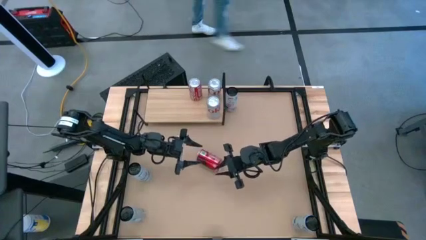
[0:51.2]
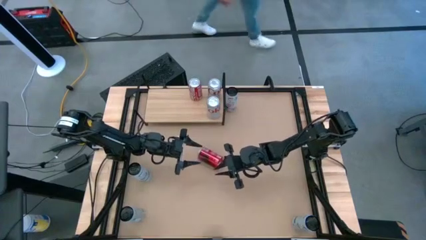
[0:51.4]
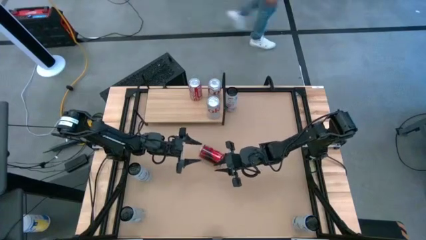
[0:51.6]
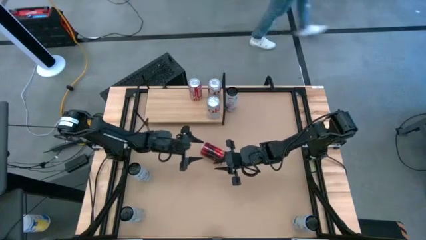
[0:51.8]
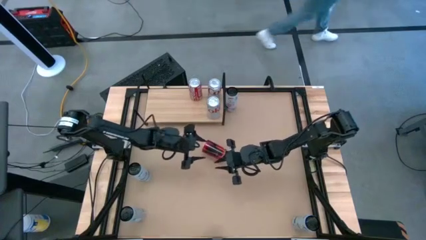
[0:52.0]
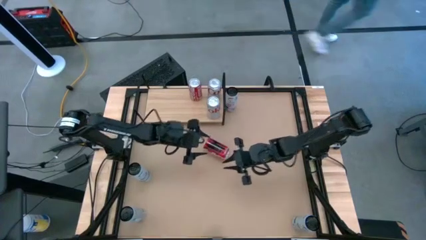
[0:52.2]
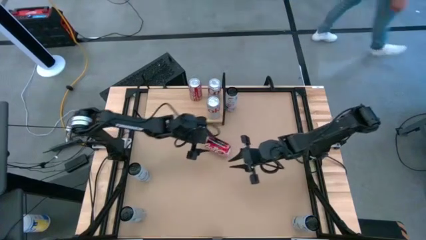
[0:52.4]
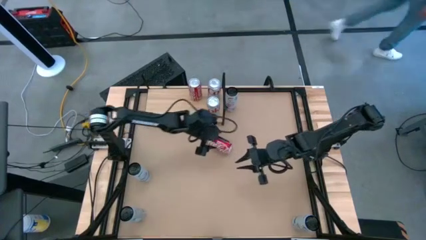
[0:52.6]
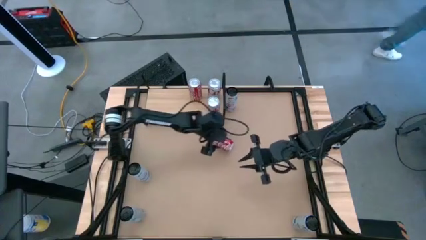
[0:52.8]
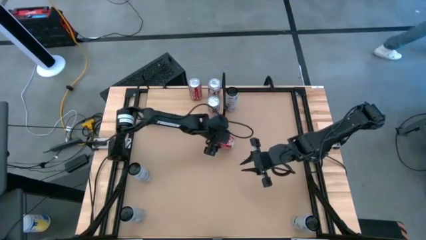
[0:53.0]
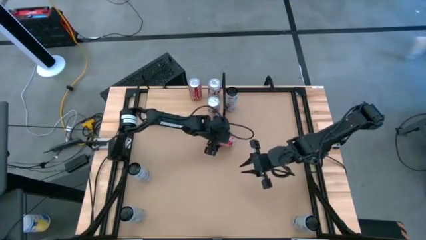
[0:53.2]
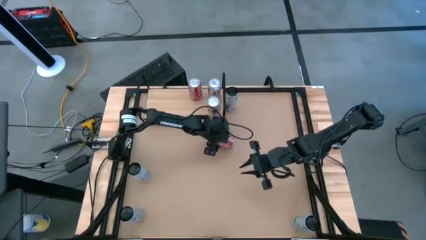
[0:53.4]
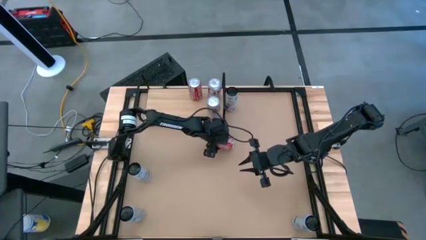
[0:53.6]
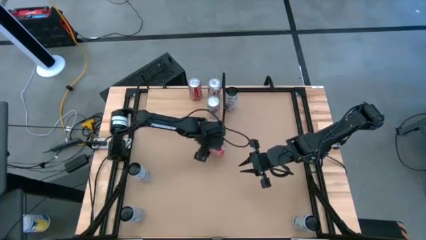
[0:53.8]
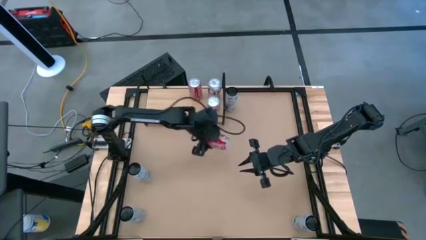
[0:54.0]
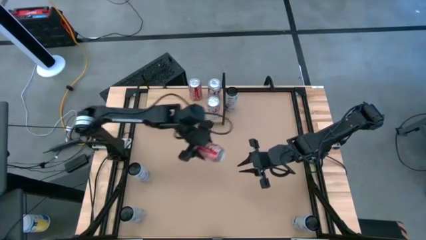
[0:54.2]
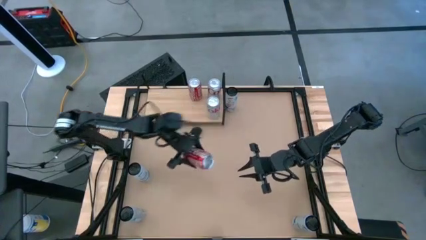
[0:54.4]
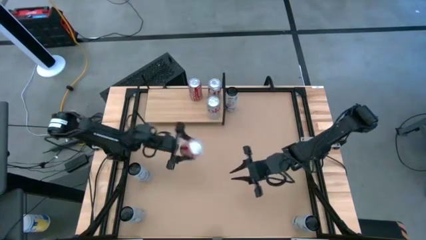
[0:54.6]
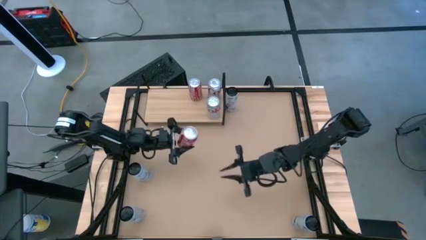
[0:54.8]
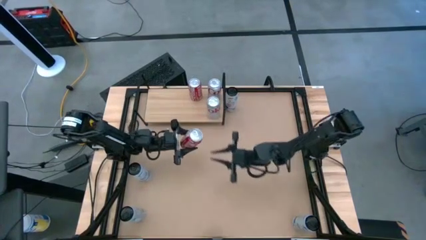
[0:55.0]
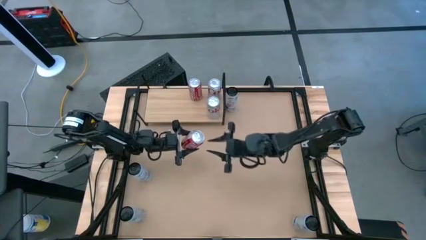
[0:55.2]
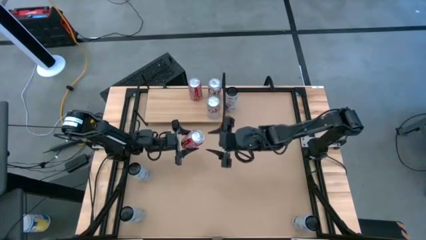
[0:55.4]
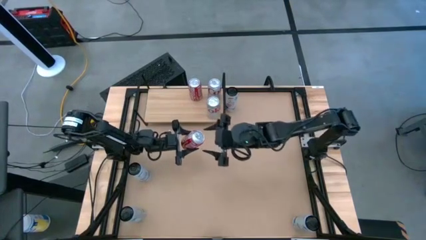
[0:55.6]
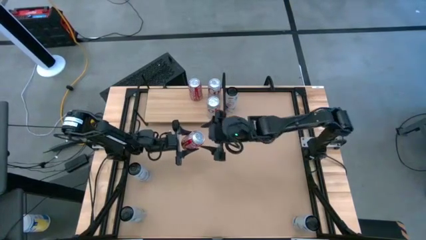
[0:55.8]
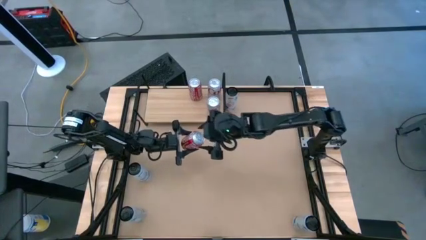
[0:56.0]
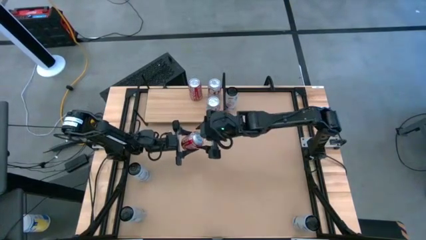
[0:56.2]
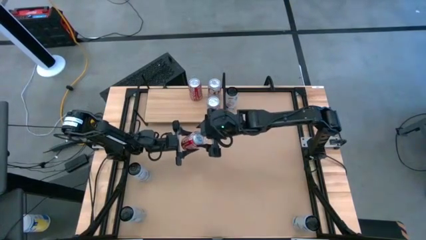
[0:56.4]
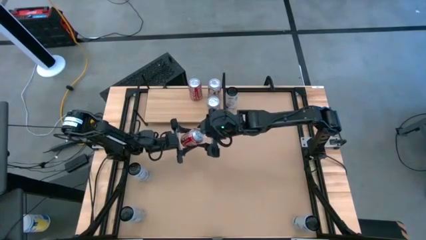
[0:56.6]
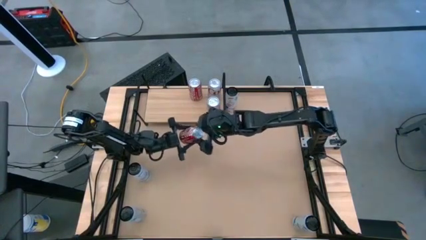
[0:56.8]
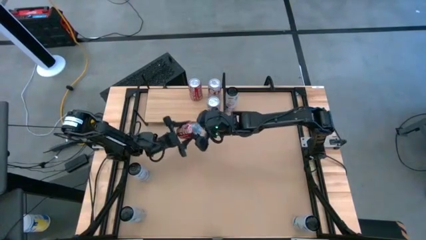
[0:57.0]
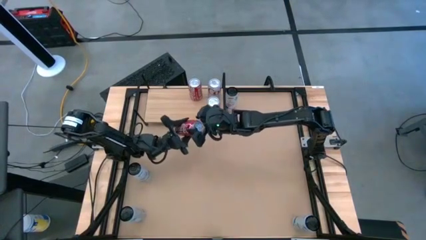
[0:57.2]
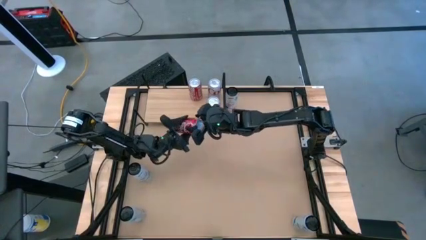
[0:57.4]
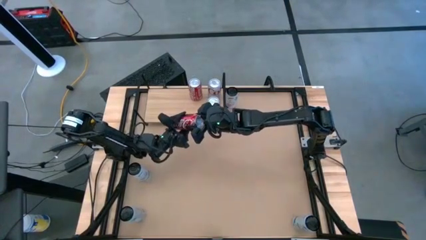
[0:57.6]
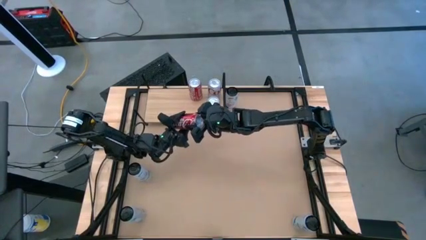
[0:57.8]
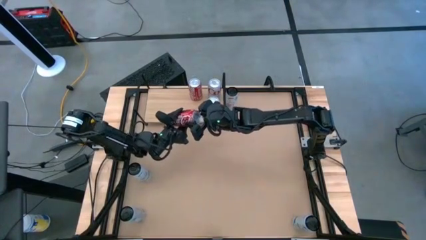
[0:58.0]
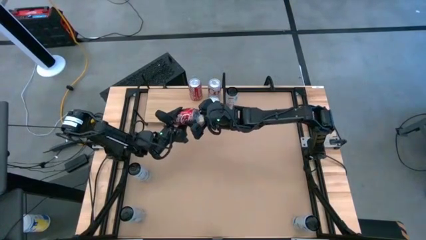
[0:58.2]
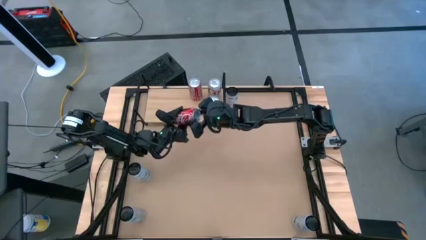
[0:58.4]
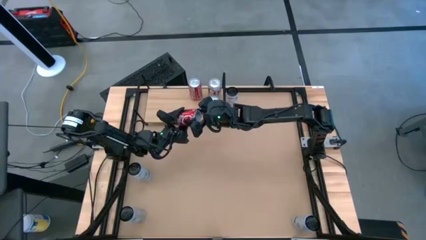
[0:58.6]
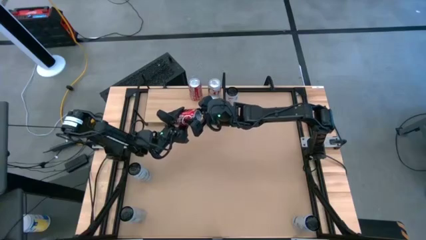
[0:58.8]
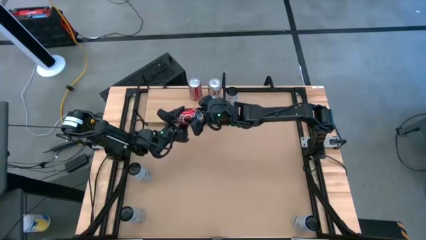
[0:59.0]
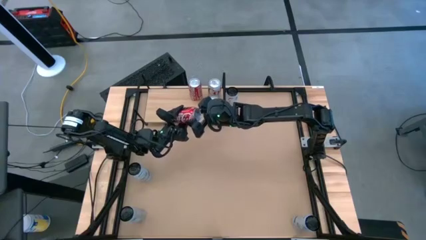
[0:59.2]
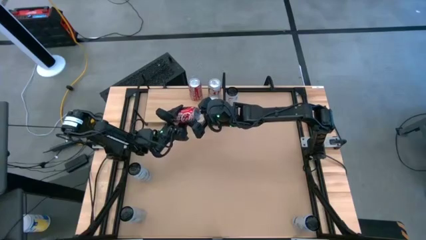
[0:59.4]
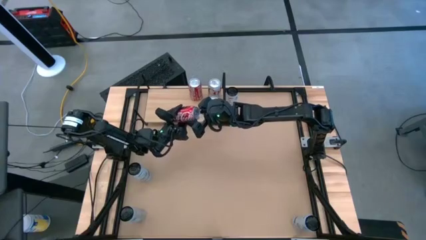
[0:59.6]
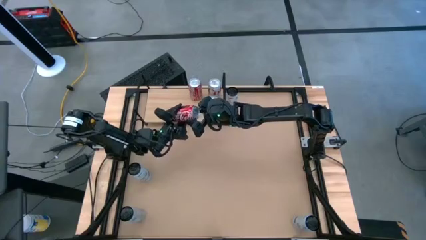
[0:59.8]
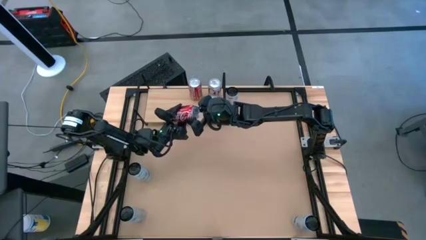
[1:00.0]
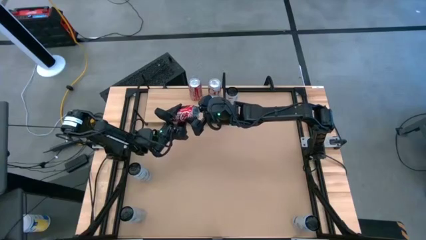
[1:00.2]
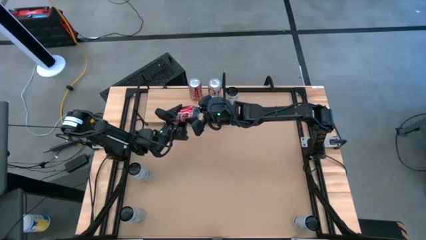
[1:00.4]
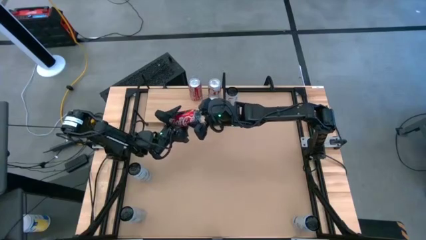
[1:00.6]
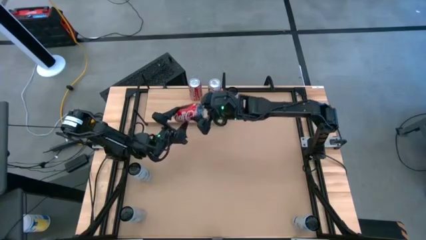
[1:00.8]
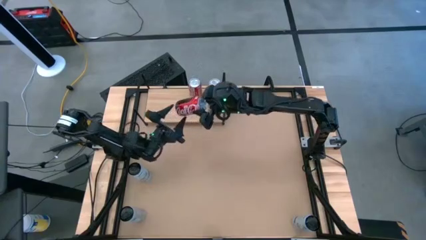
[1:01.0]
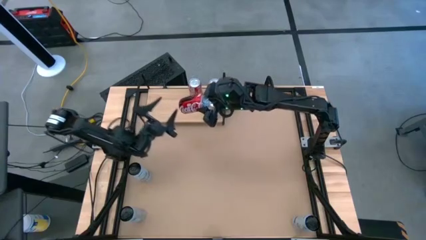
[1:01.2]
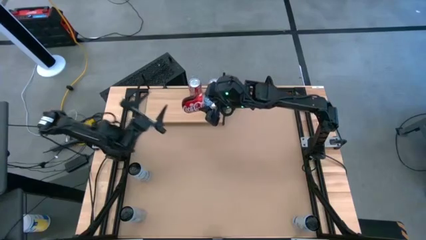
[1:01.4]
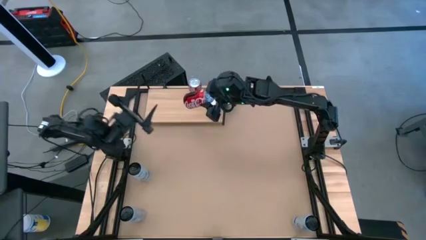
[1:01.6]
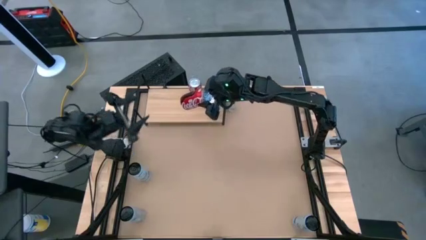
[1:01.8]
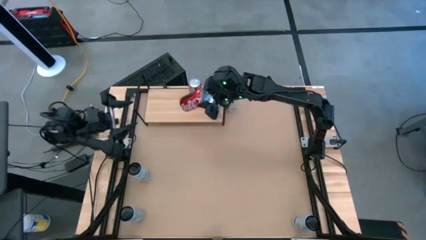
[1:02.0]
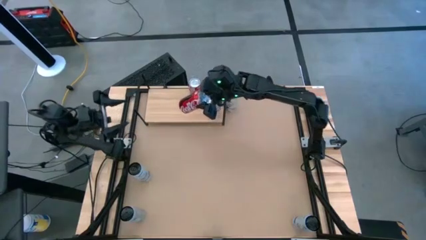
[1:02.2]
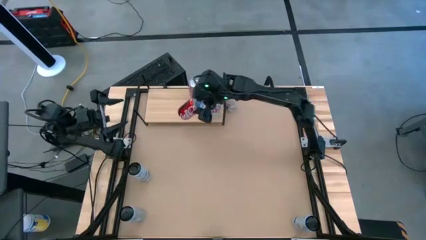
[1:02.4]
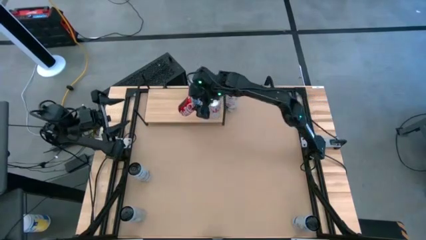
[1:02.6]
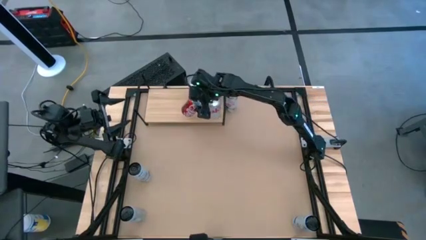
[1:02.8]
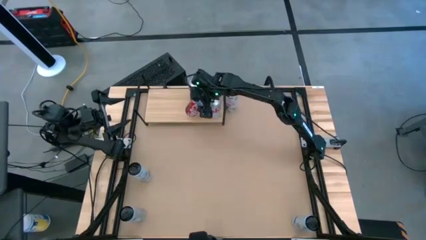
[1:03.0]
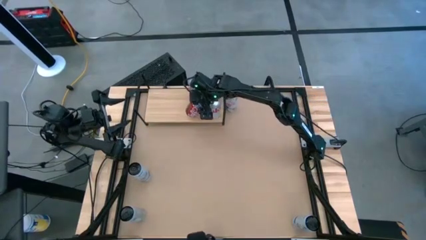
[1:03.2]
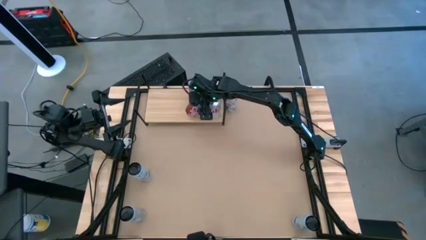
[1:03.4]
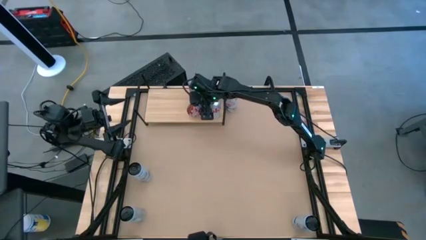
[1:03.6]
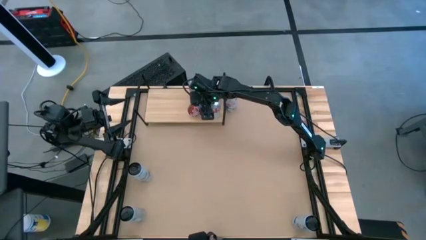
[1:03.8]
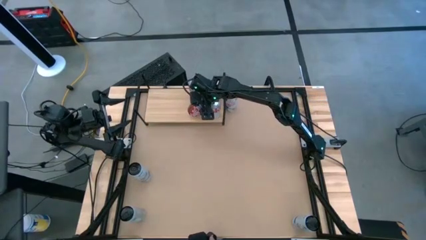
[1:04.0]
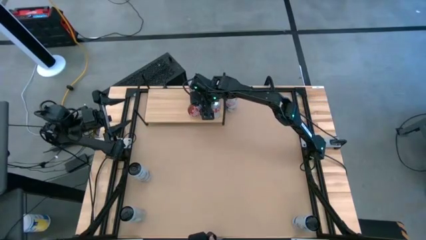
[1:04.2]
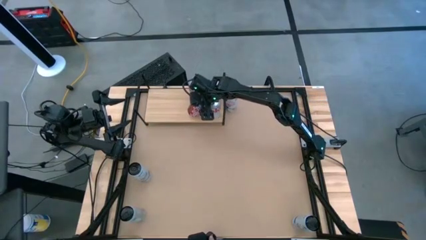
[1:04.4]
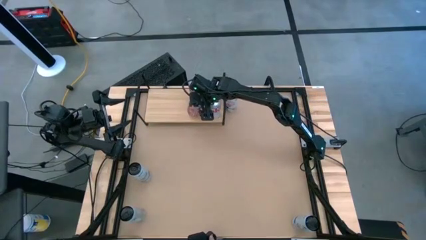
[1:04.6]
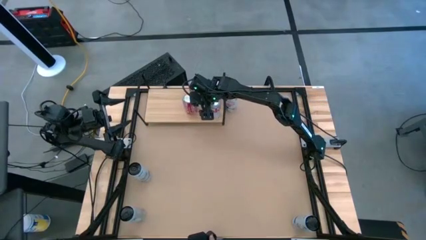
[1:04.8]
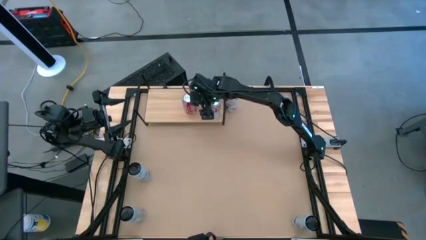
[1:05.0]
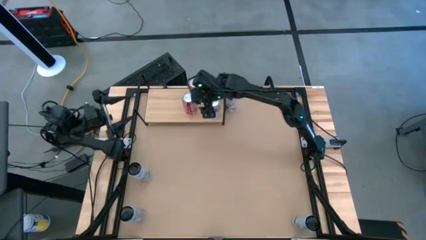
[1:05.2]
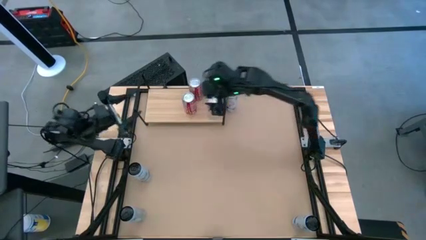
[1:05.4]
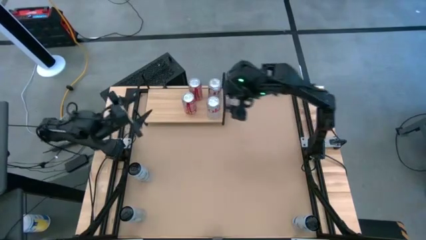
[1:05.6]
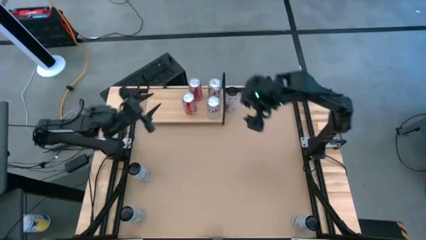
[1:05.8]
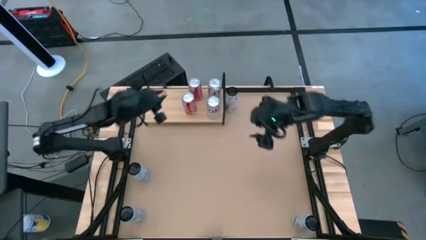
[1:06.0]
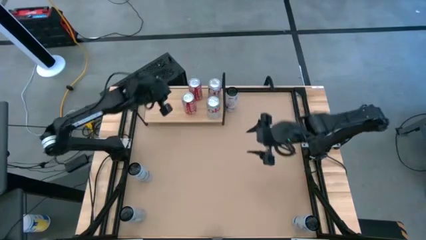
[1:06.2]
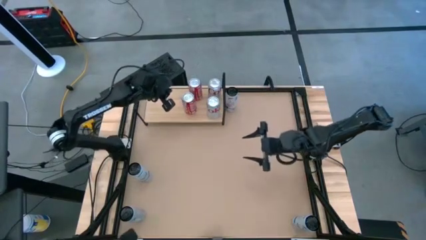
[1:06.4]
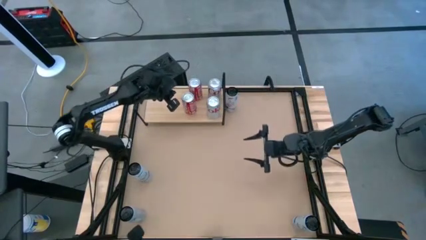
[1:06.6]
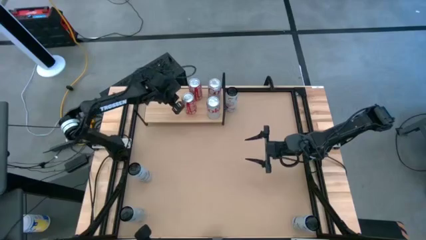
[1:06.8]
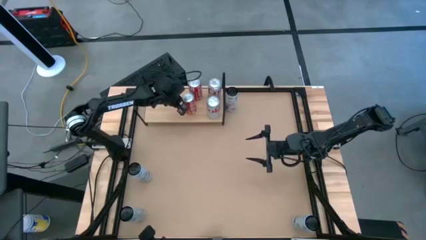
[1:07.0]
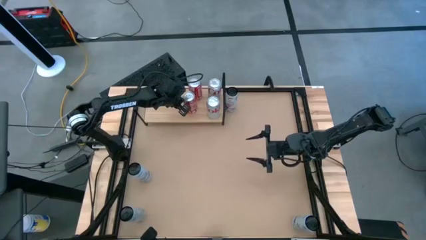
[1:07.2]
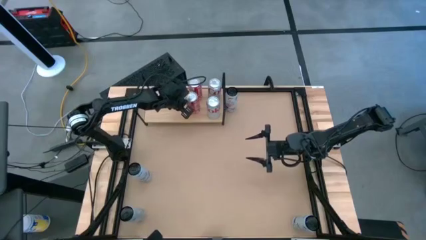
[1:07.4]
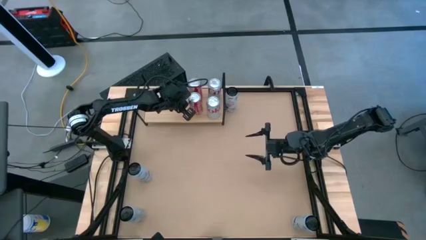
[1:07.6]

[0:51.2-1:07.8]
Task: Place canned beverage on shelf
Put the red and white soda can on the shelf aligned with the other red and white soda can
